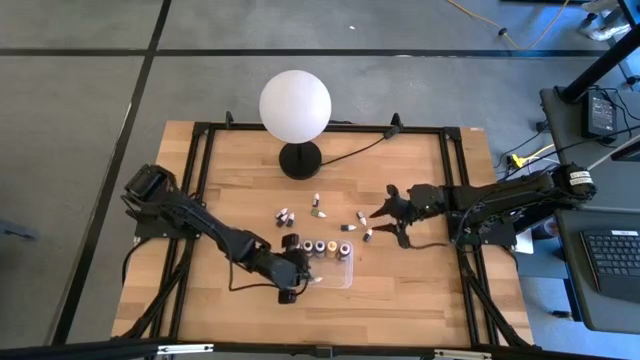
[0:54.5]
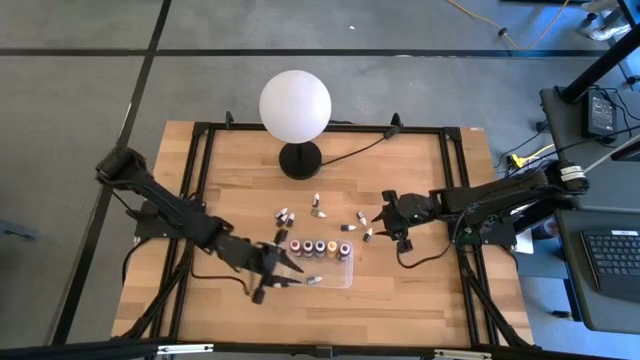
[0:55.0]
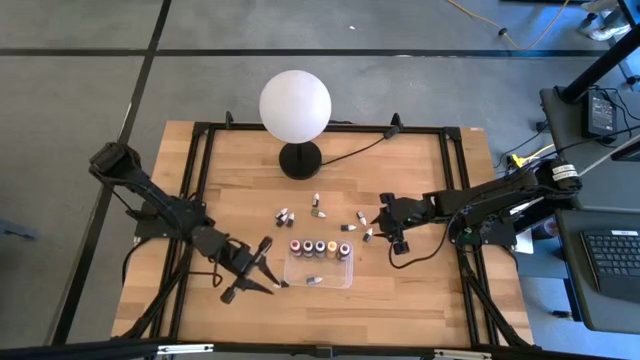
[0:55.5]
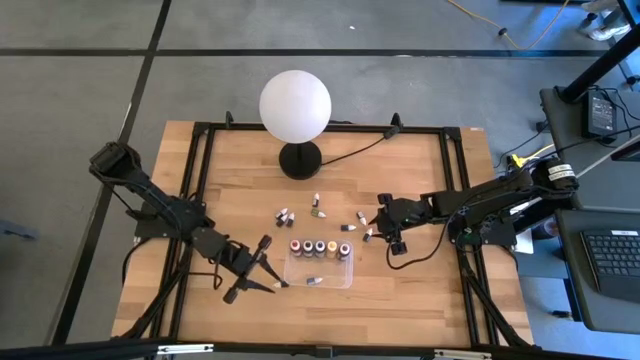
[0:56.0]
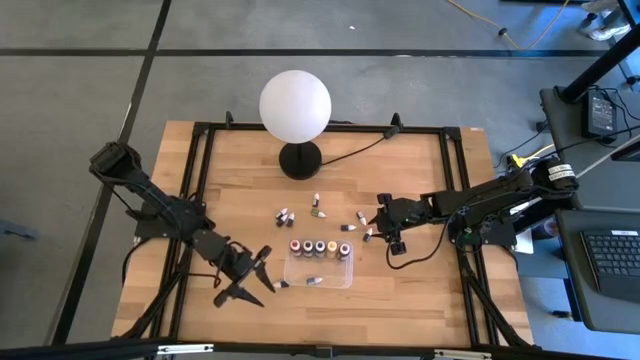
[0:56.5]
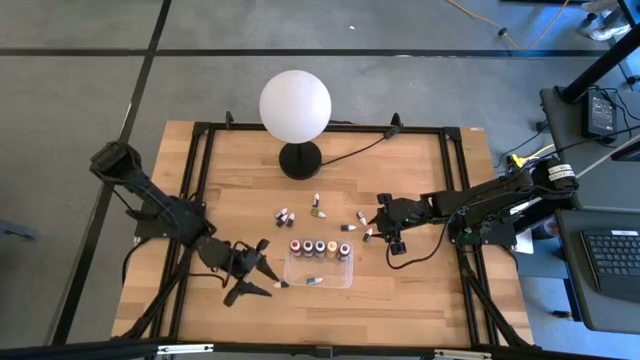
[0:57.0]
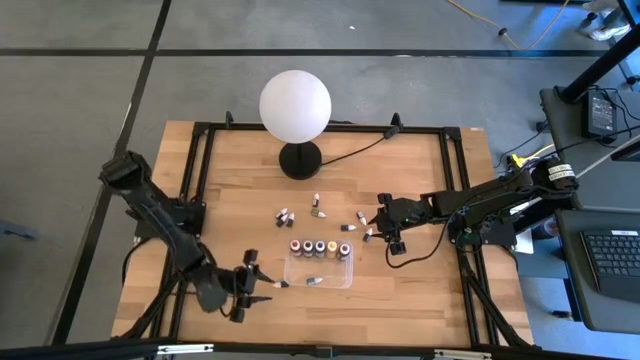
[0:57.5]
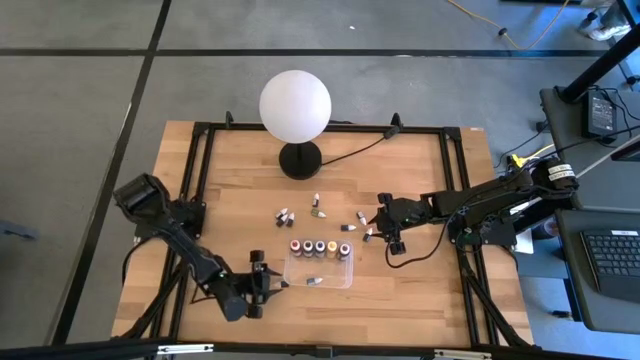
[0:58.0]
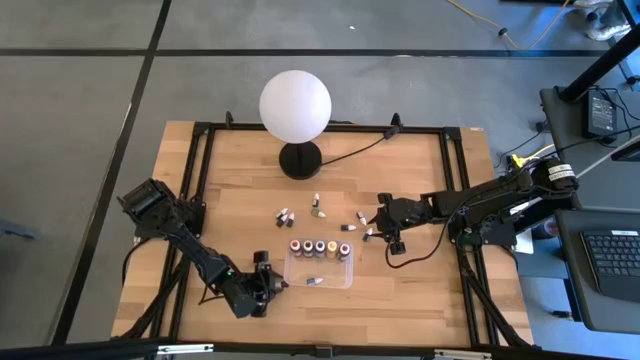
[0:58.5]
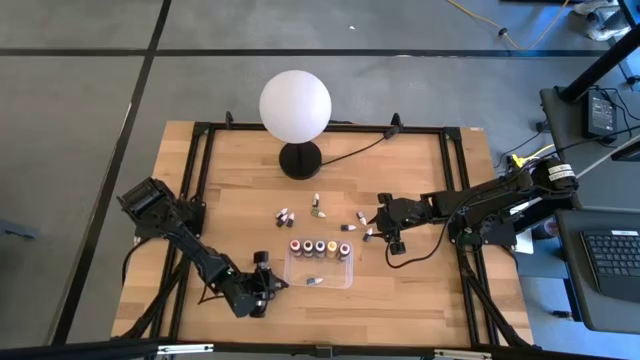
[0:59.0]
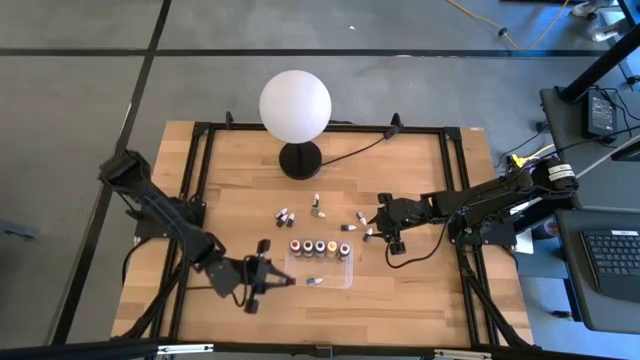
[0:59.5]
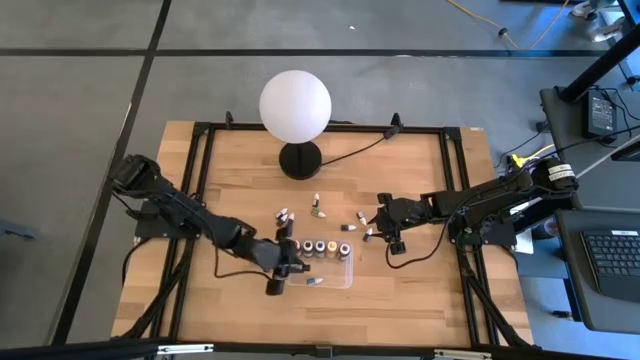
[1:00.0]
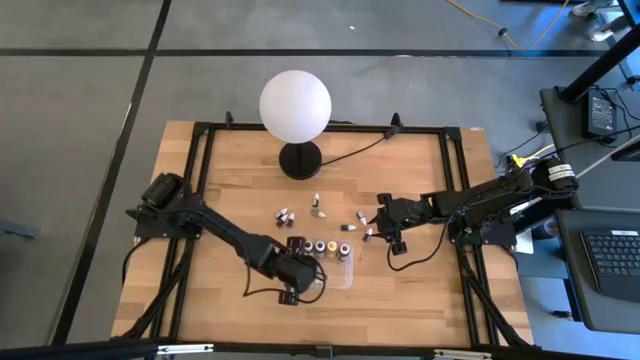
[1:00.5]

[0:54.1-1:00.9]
Task: Pick & Place food coloring
Put the small red food coloring bottle into the transparent bin

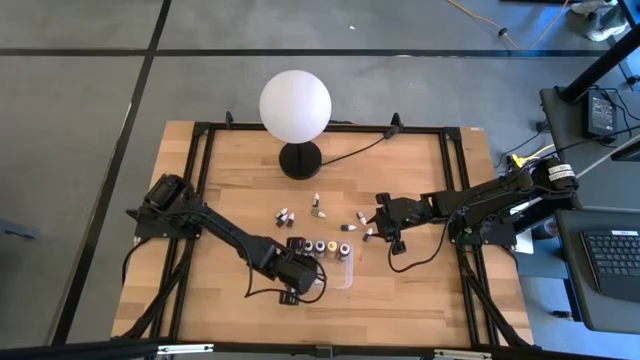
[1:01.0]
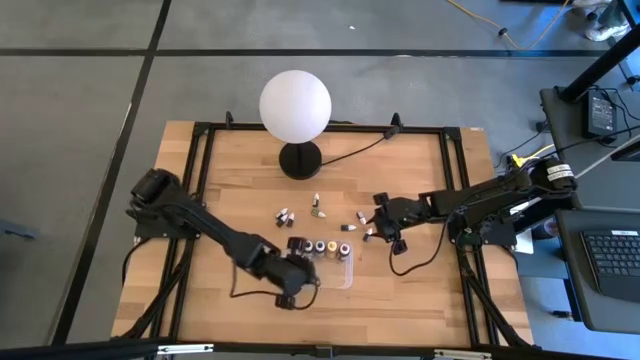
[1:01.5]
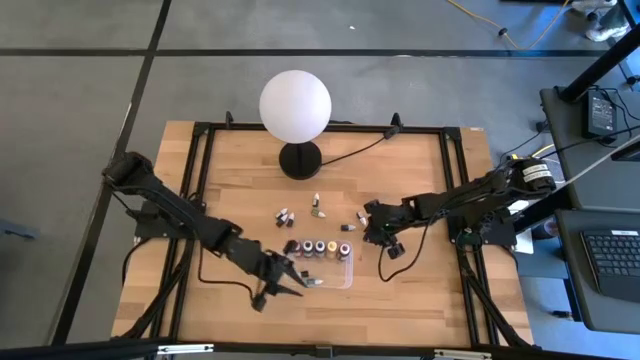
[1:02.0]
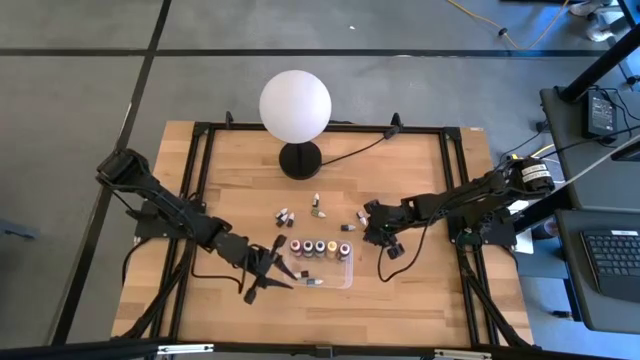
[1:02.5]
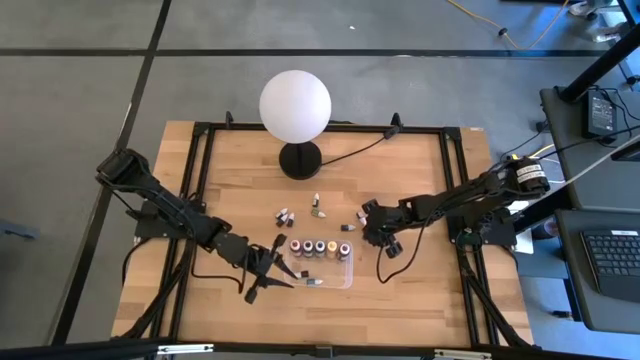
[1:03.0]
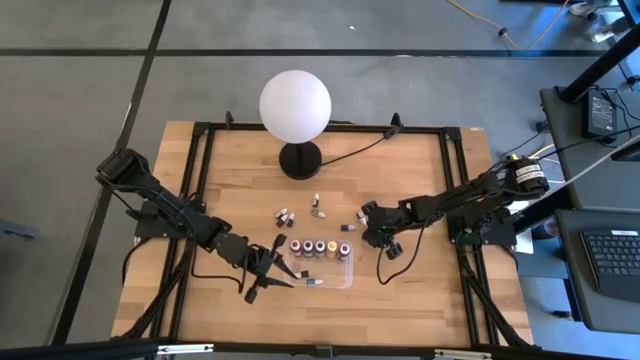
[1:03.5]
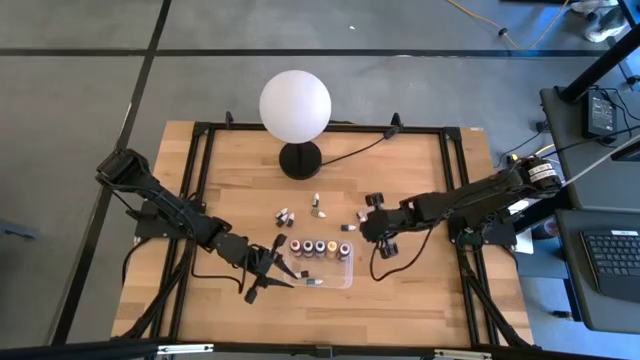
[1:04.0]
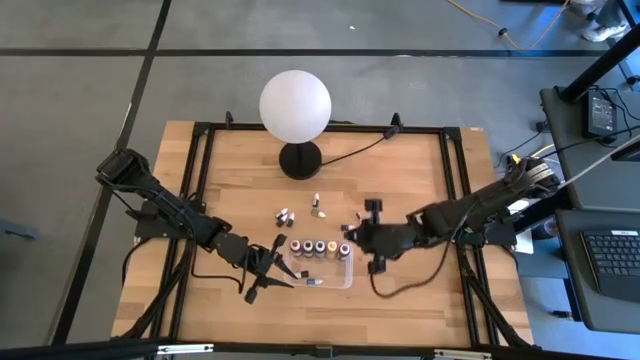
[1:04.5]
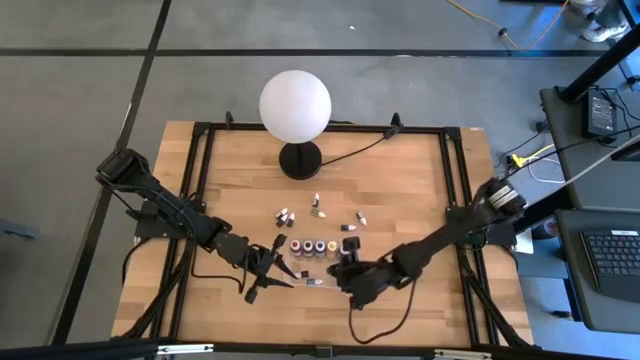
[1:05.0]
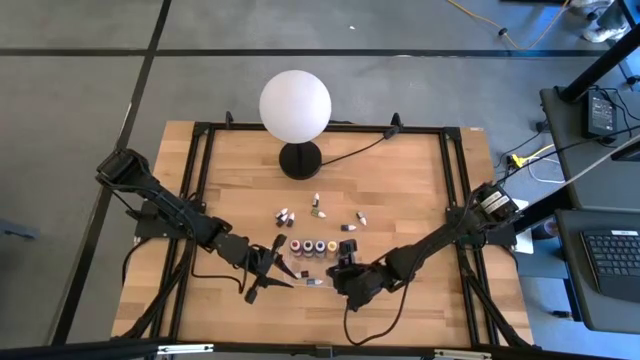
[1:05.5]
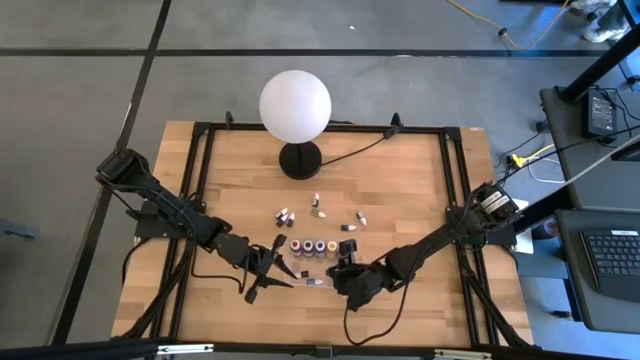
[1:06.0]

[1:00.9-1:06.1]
Put the small green food coloring bottle into the transparent bin

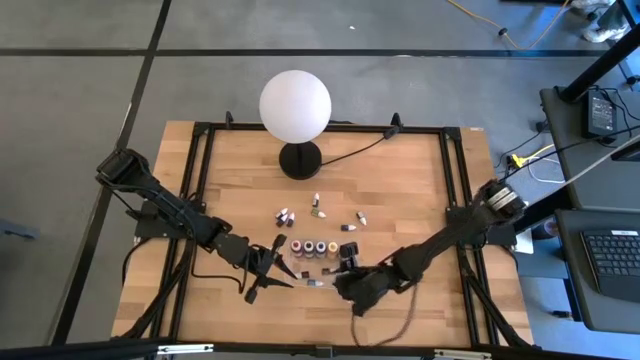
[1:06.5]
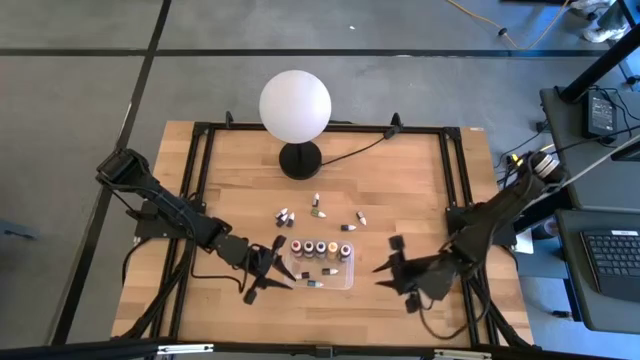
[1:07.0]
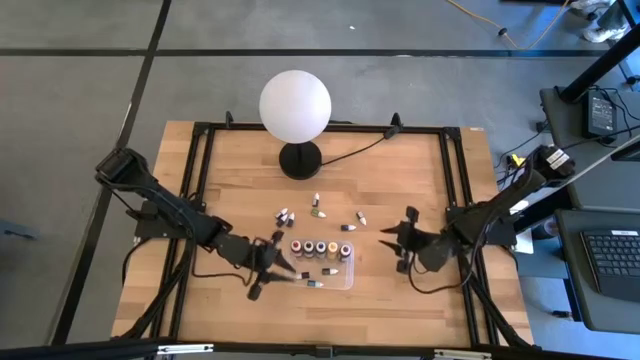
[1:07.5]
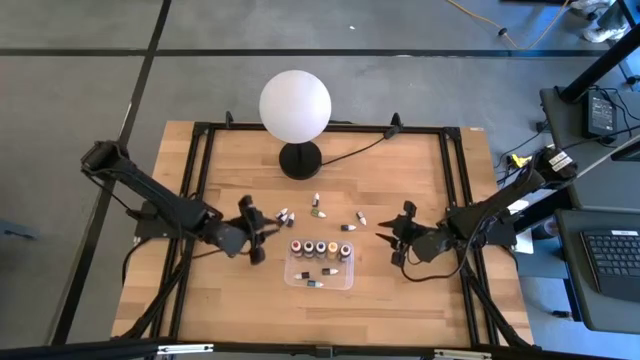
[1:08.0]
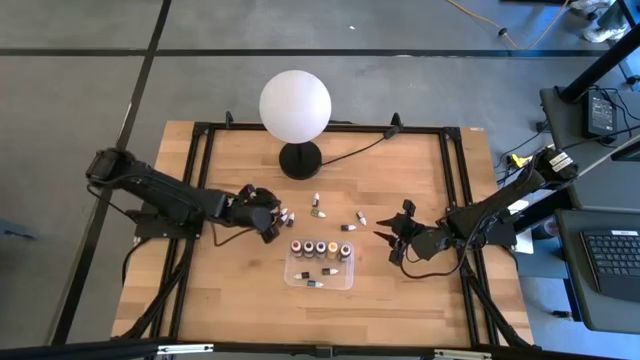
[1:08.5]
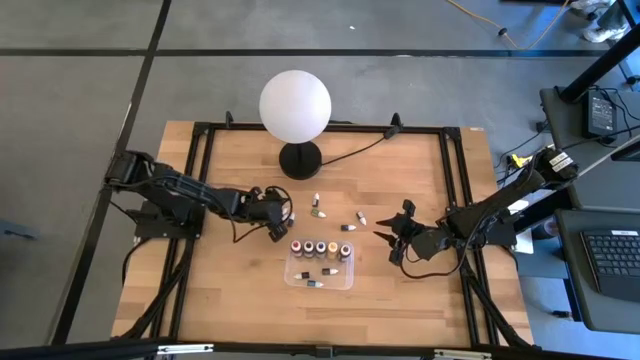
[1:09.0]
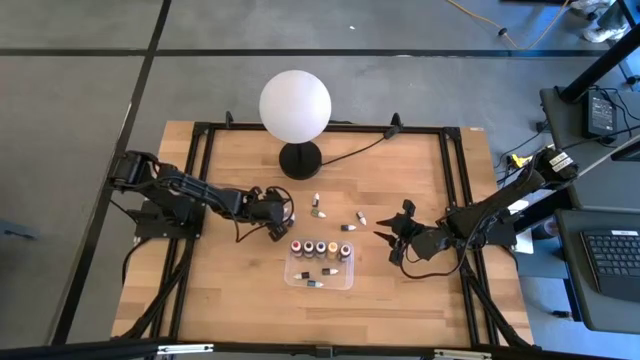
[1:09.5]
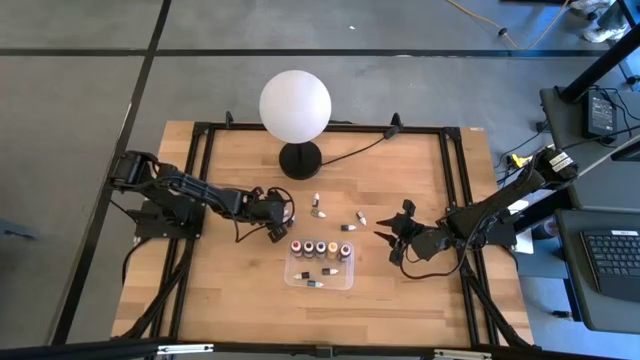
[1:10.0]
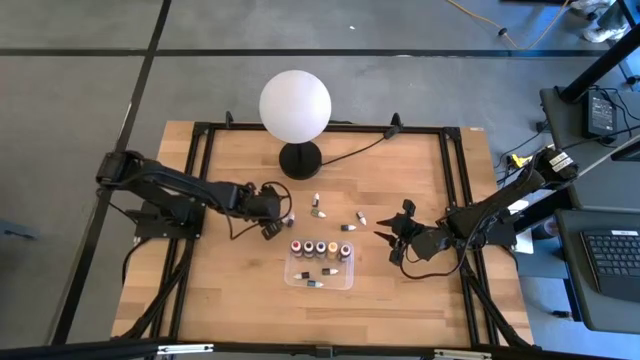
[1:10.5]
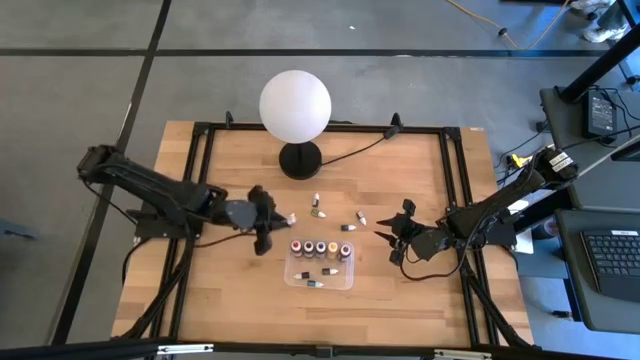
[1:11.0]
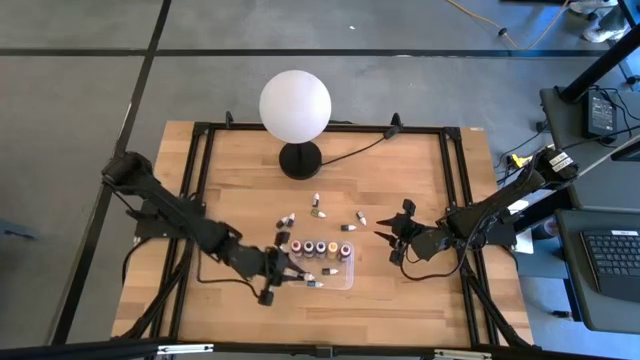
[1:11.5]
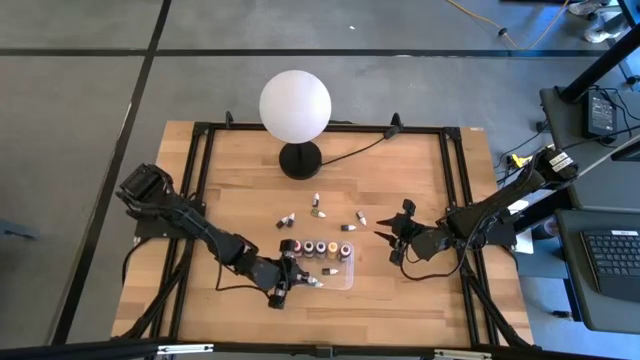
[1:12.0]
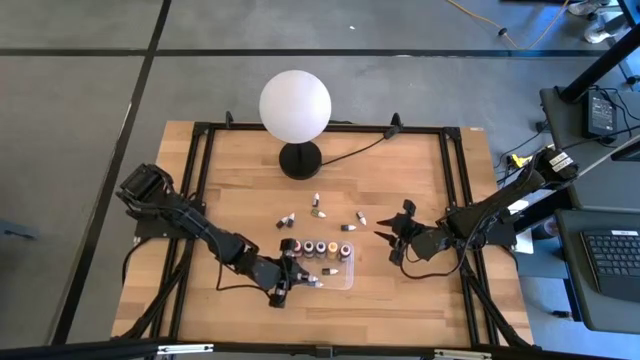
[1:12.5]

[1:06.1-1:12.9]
Put the small red food coloring bottle into the transparent bin

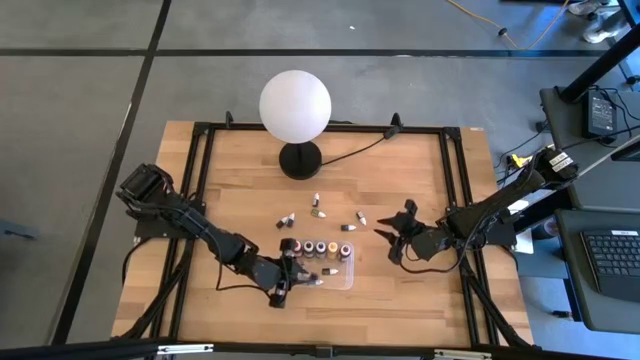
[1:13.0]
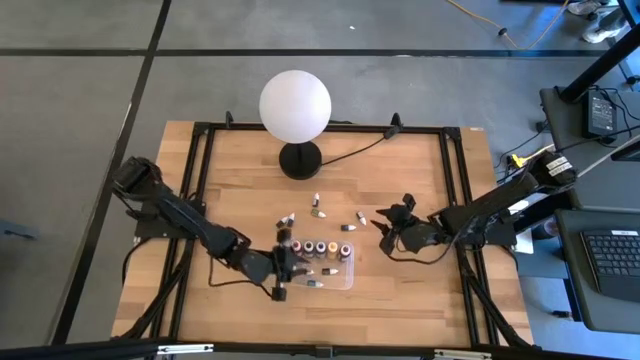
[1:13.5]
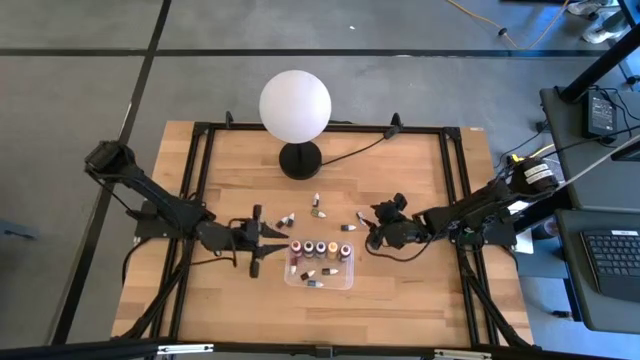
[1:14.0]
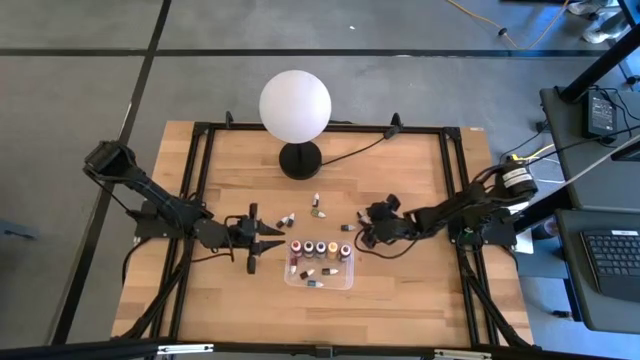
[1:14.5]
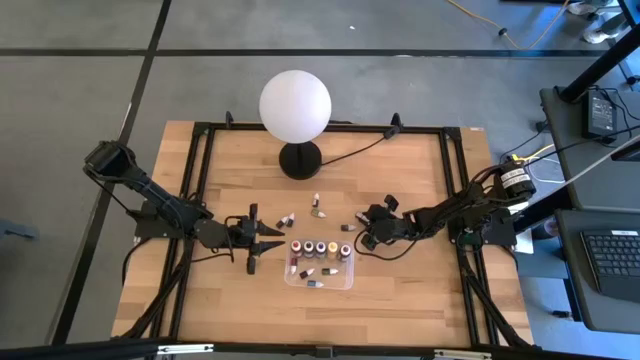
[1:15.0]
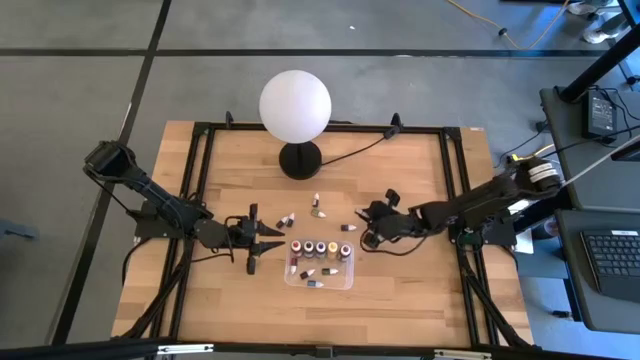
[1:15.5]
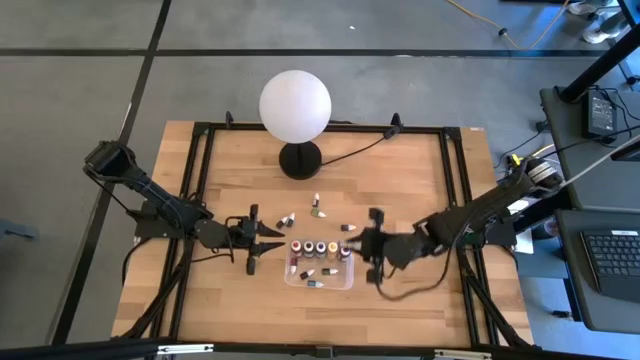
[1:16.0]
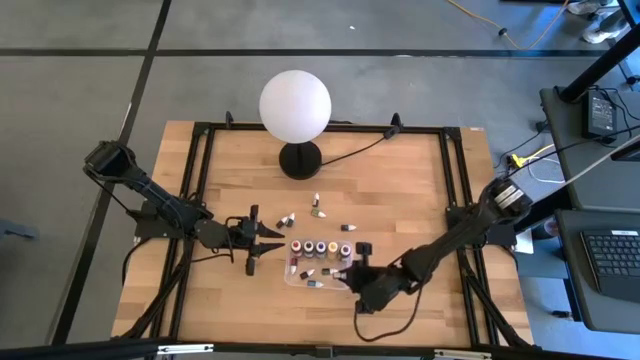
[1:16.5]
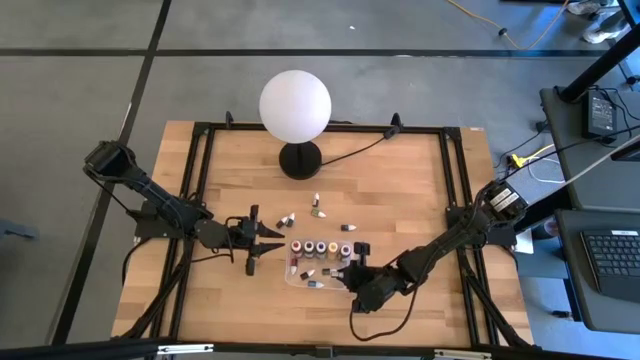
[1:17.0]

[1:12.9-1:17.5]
Put the small red food coloring bottle into the transparent bin
